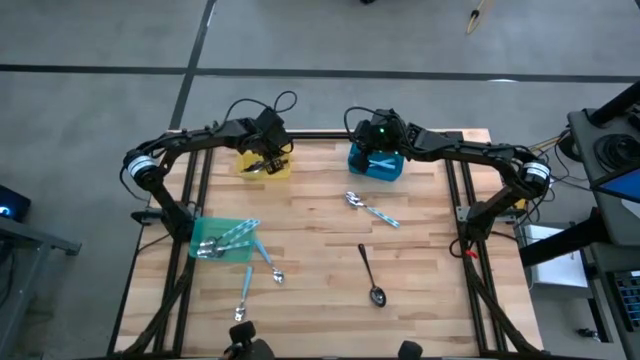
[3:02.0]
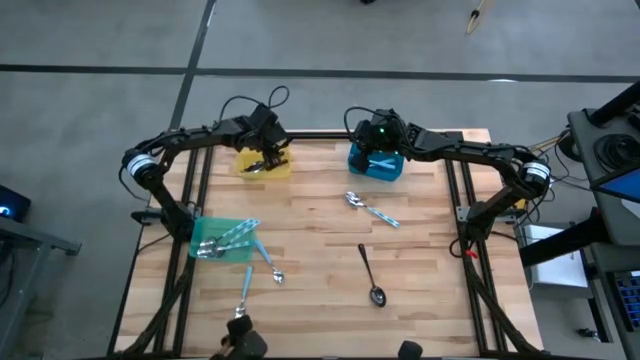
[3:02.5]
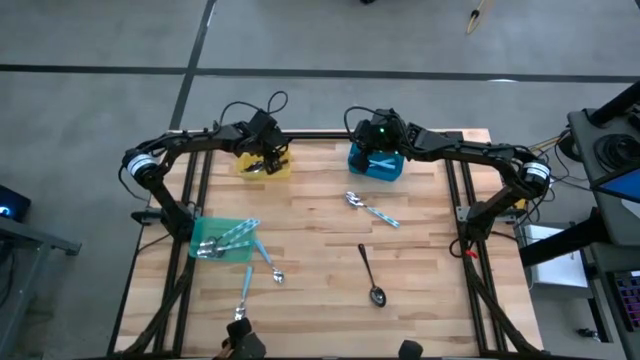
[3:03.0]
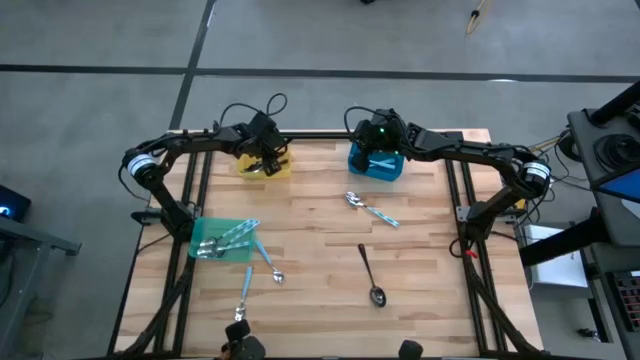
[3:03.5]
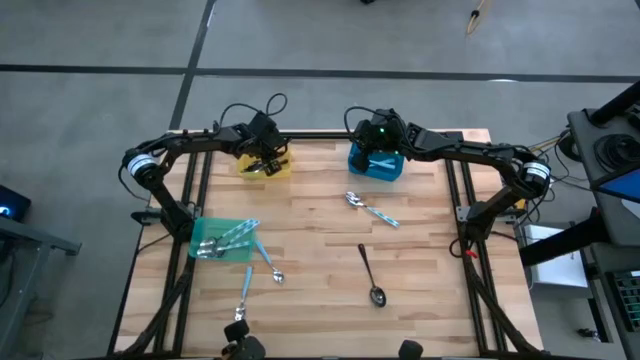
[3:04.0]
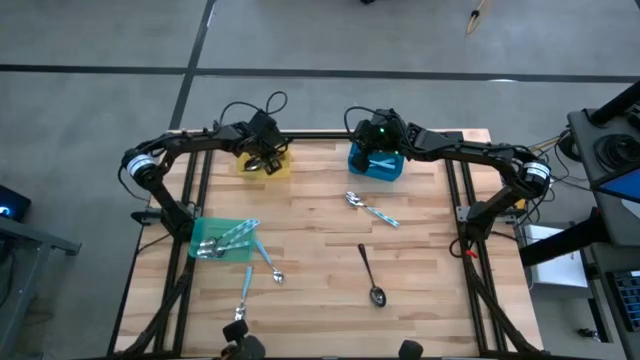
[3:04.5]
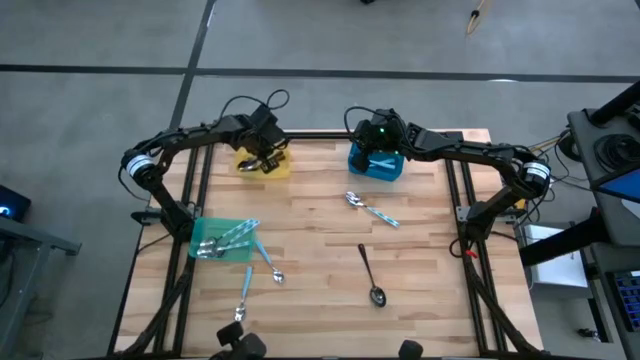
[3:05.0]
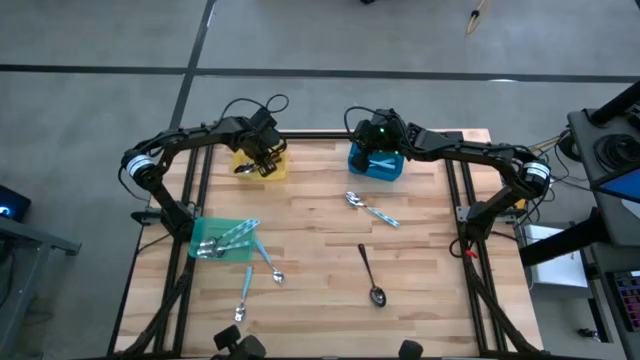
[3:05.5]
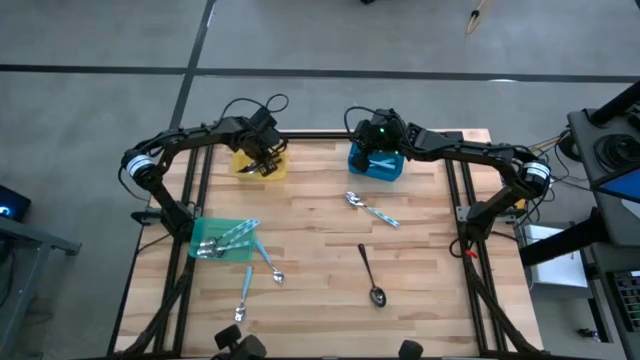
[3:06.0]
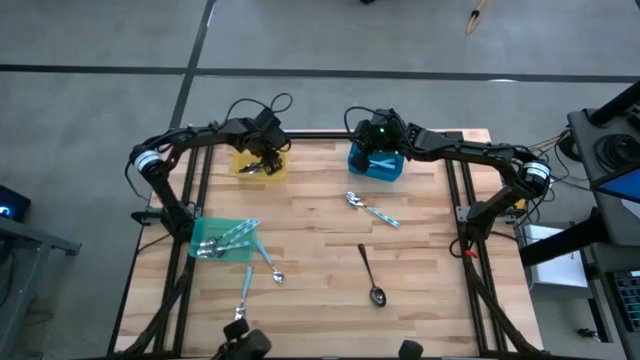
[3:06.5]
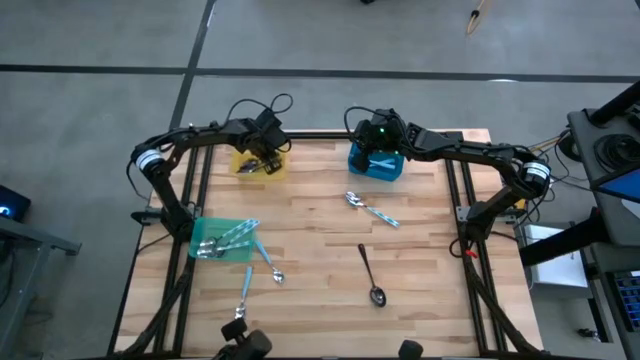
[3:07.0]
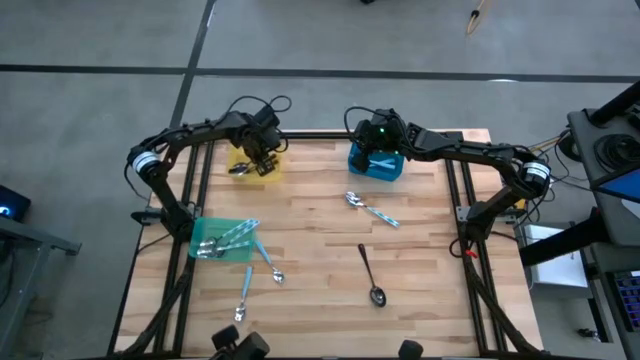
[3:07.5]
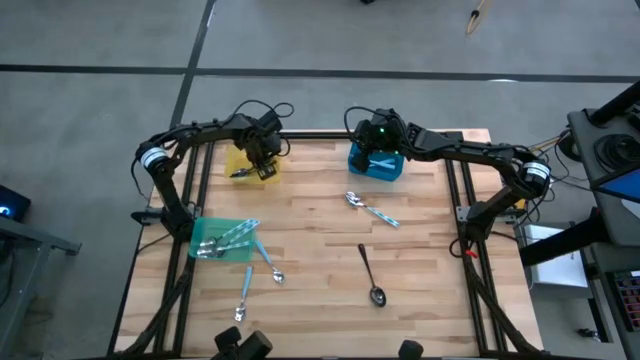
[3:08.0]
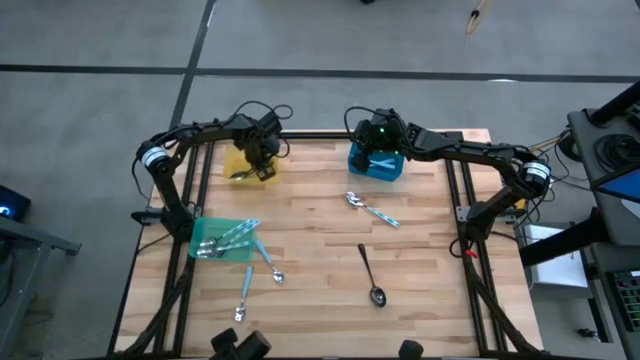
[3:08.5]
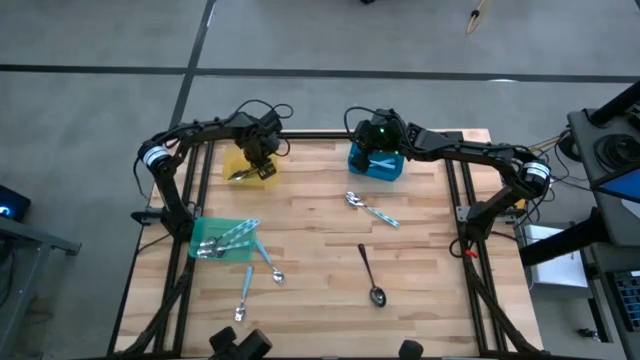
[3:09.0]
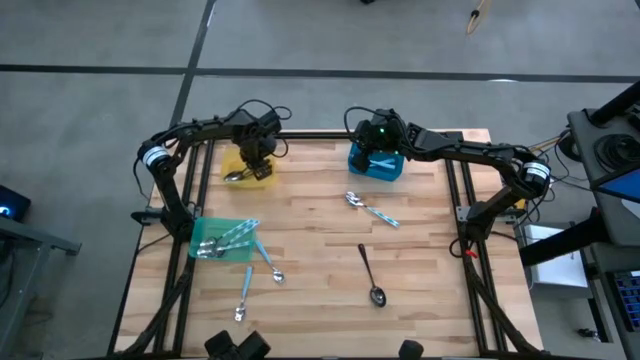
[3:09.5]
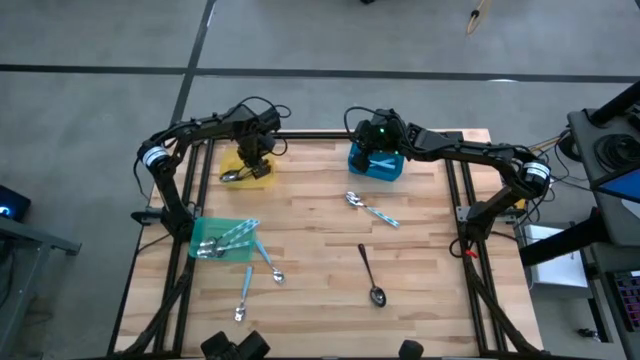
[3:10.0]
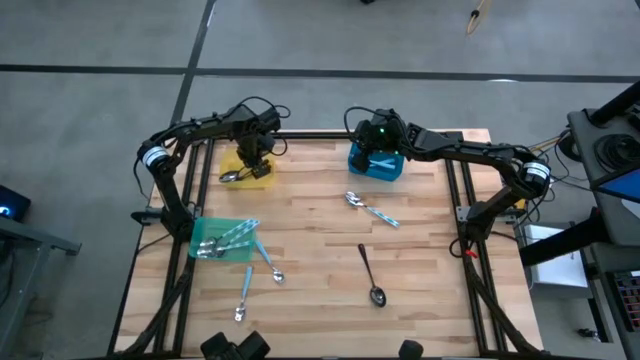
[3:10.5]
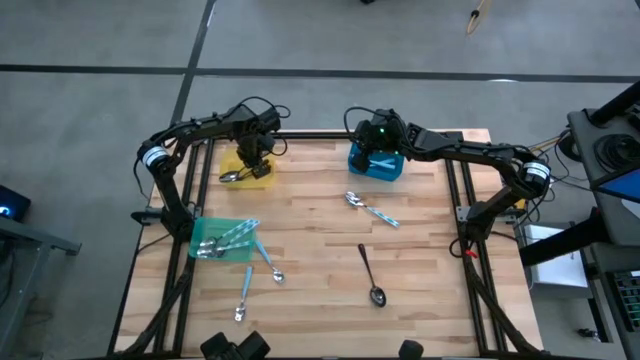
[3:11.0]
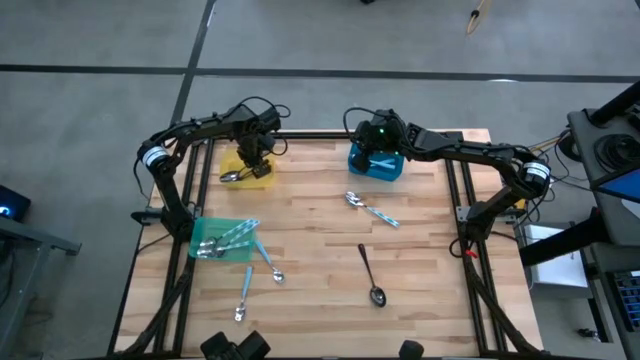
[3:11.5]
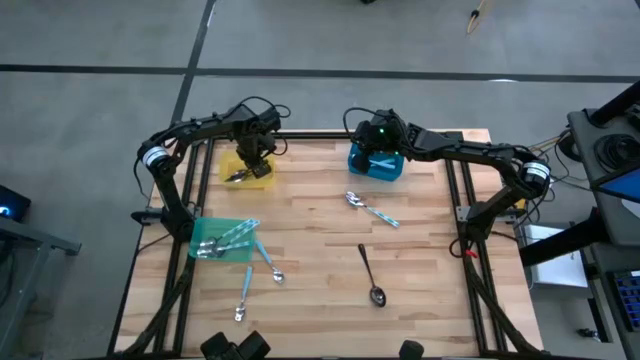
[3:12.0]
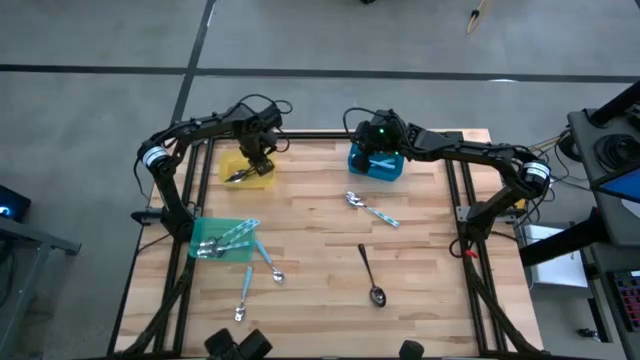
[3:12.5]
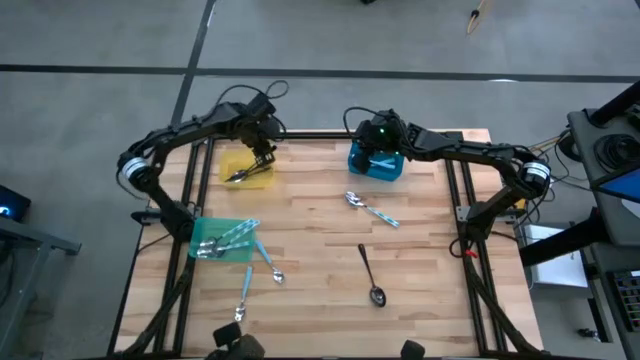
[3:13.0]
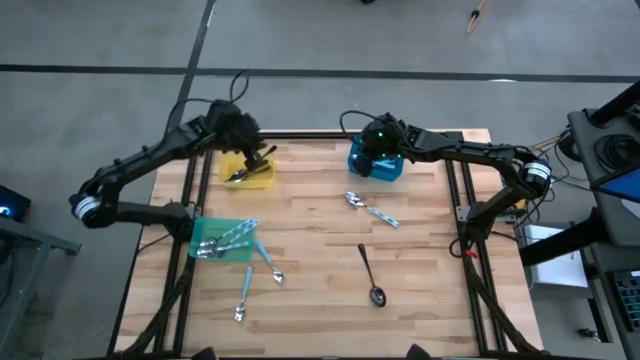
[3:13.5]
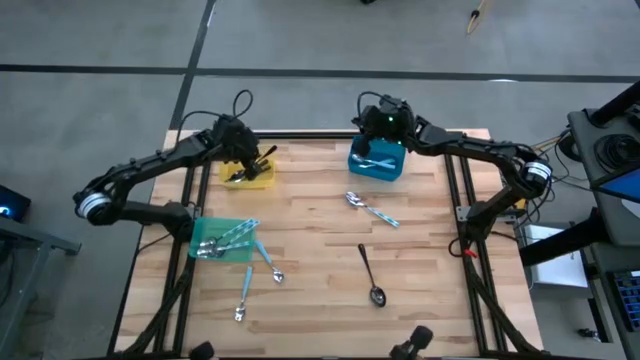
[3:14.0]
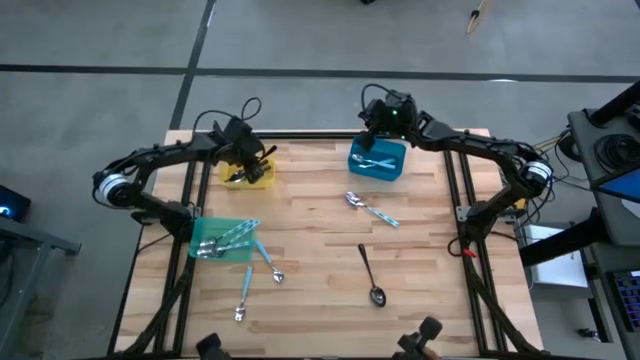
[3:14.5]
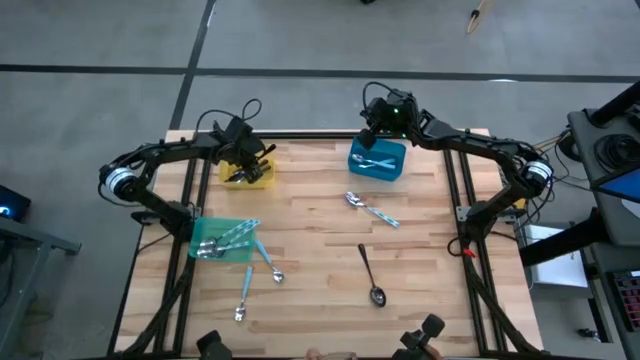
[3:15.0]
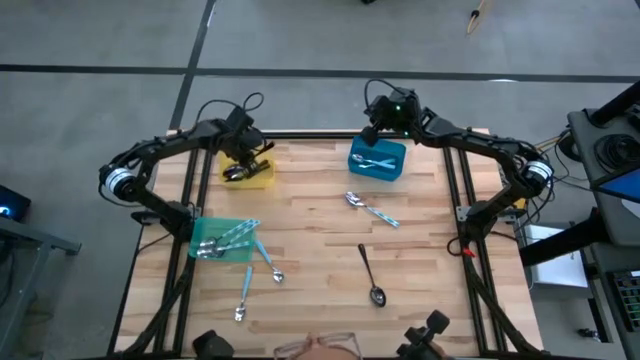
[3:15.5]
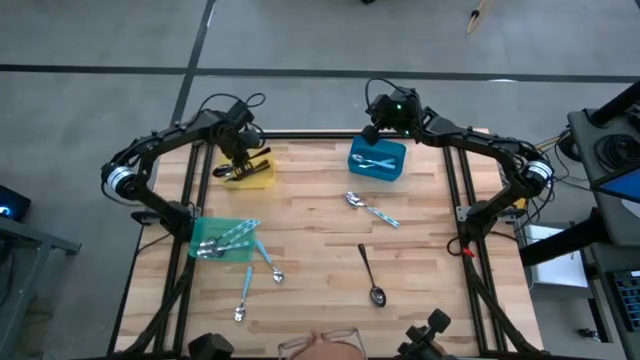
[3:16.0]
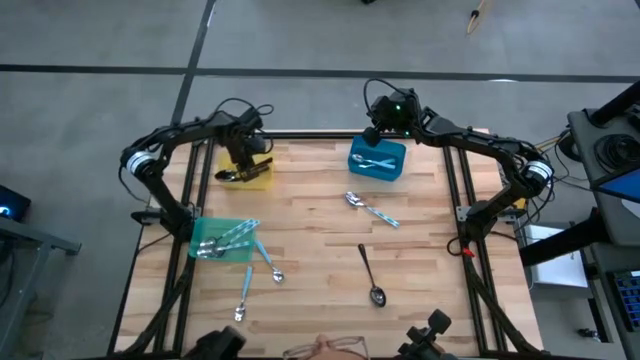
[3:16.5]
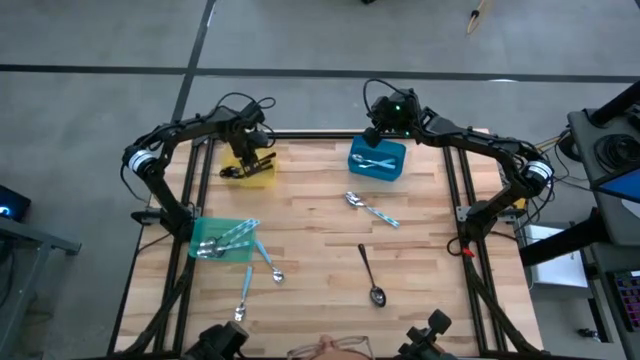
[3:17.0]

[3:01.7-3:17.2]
Task: Sort silverware by color (type)
Put the black spoon into the yellow bin

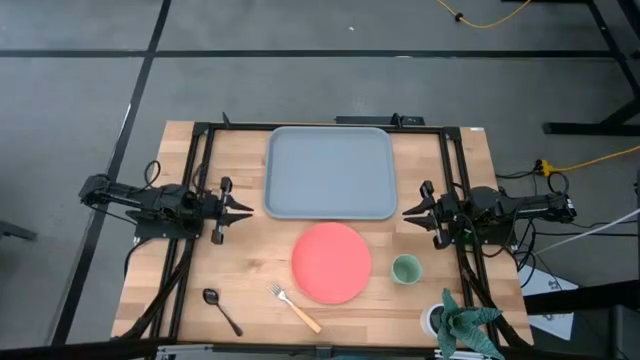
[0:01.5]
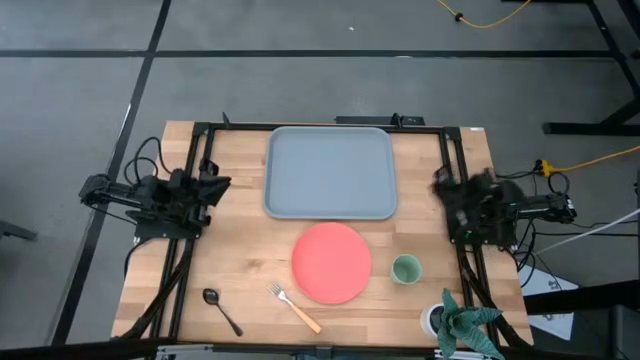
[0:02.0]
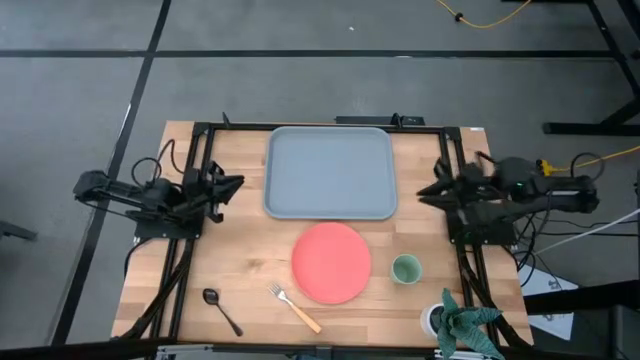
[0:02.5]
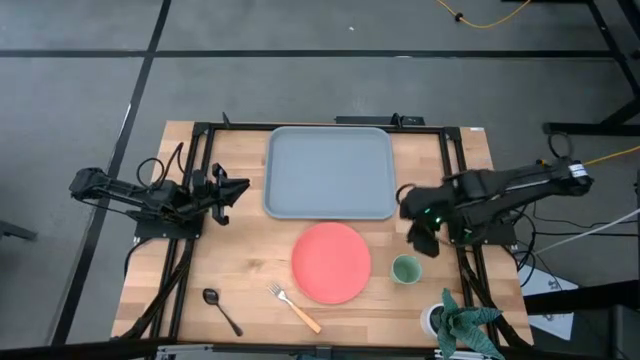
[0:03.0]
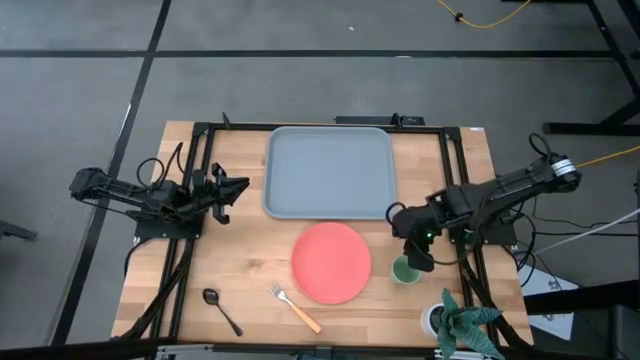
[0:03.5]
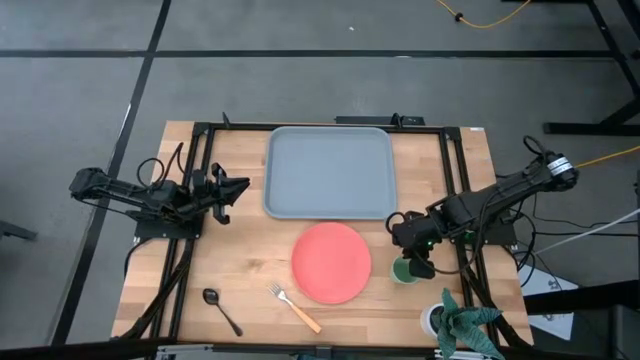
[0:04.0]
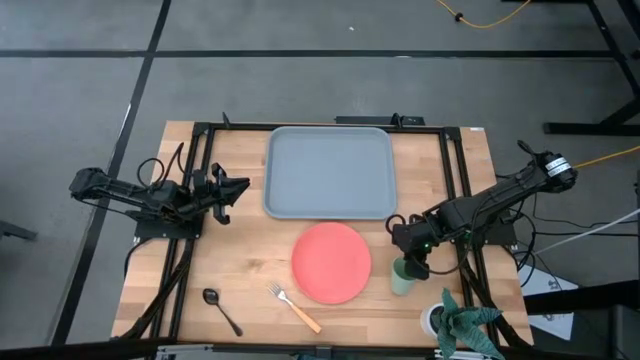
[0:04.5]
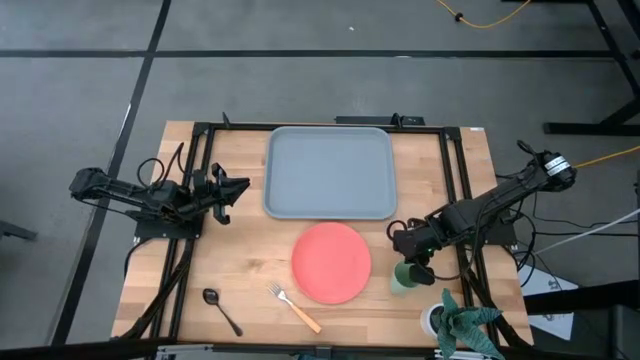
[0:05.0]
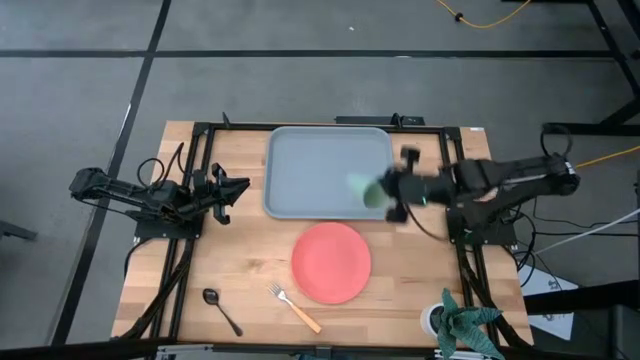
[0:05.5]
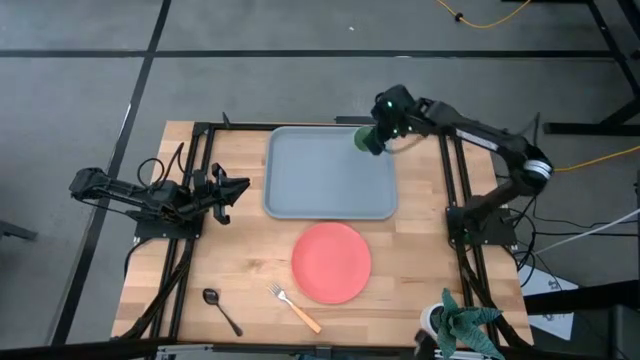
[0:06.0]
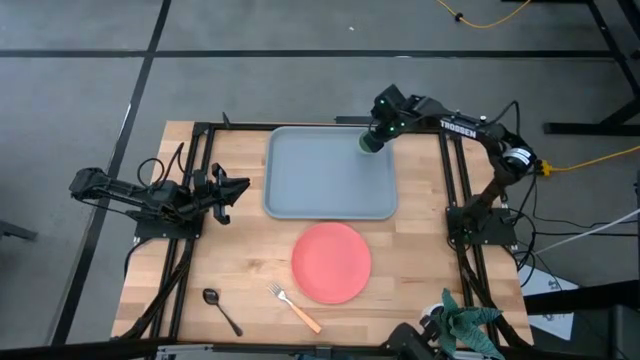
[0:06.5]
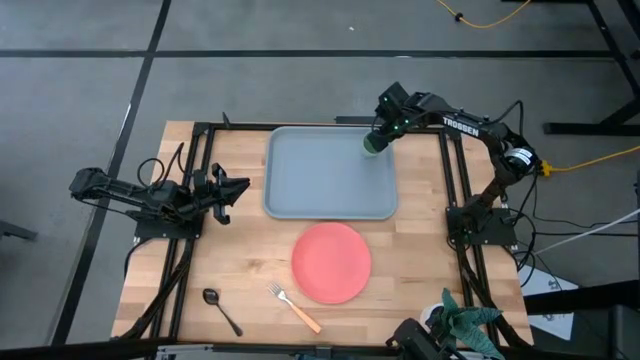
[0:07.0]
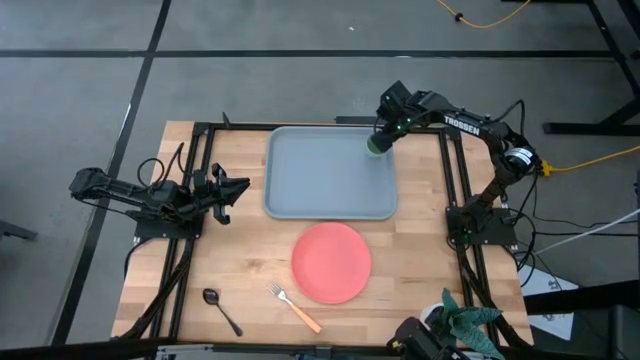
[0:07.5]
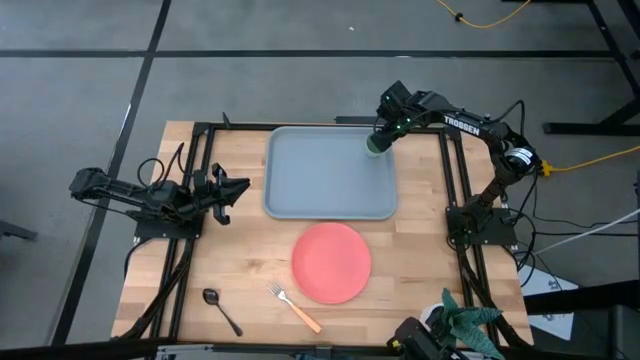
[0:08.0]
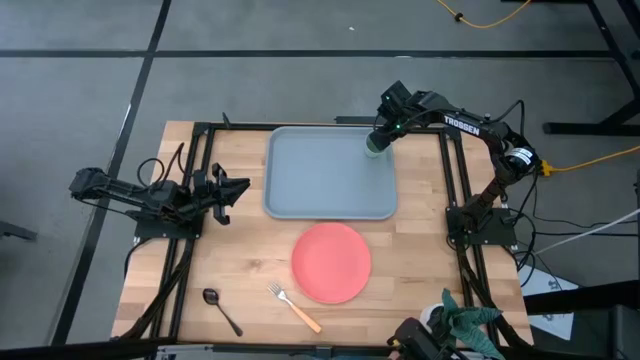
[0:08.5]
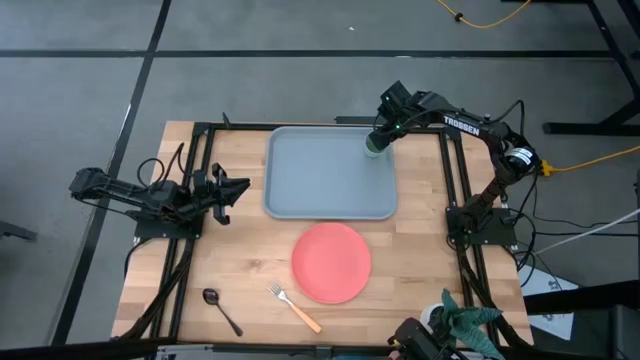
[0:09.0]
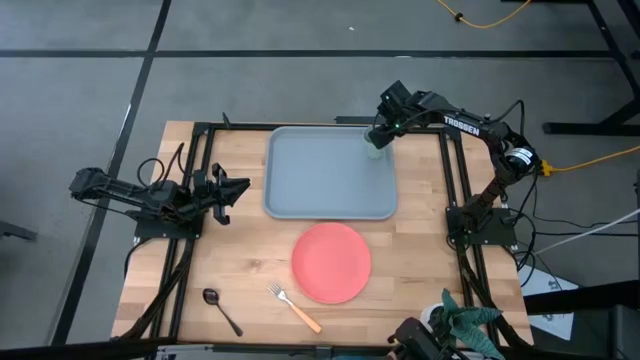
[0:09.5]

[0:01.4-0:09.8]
Task: Pick and place plate/cup/fork/spoon on tray
Put the green cup on the blue tray
